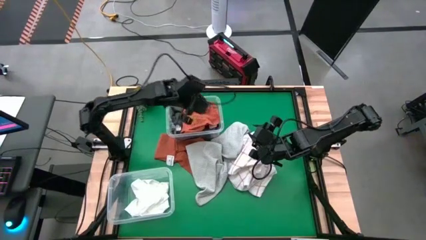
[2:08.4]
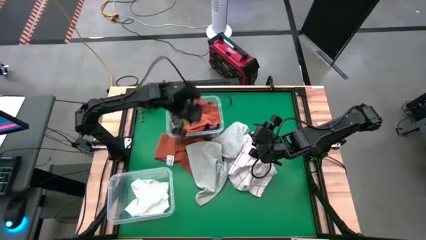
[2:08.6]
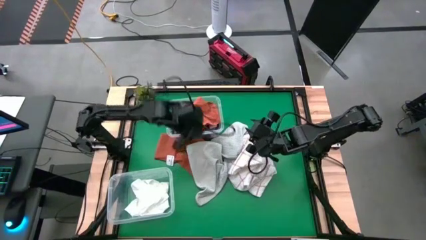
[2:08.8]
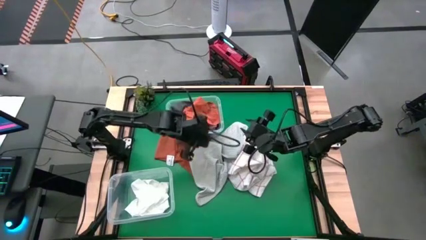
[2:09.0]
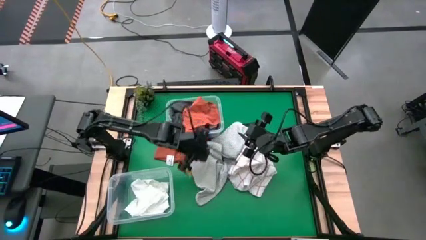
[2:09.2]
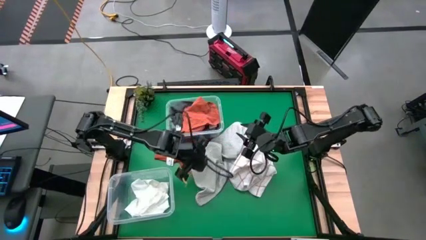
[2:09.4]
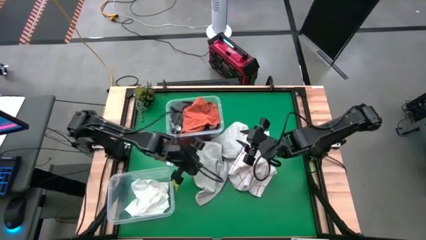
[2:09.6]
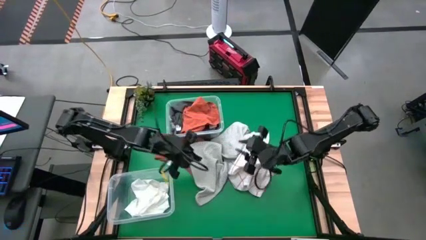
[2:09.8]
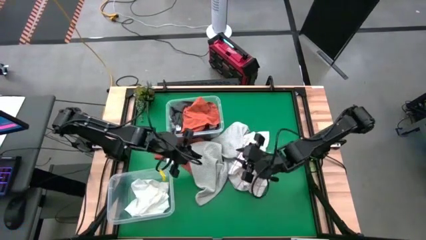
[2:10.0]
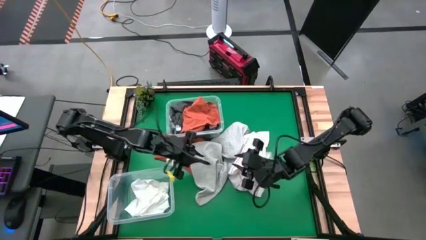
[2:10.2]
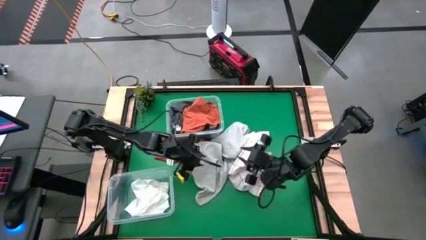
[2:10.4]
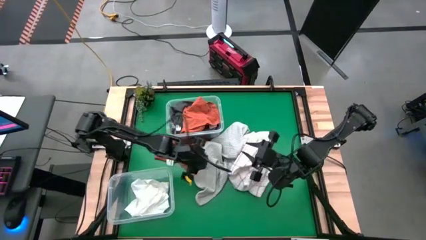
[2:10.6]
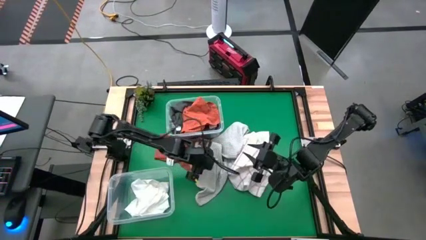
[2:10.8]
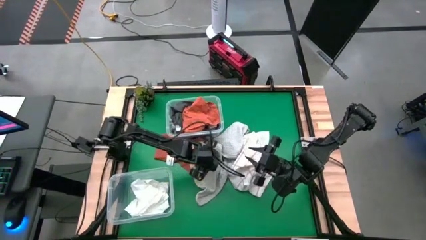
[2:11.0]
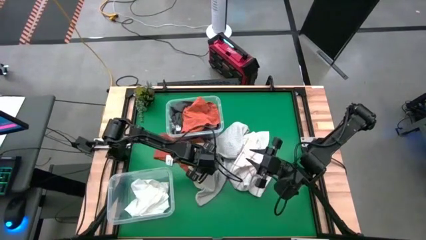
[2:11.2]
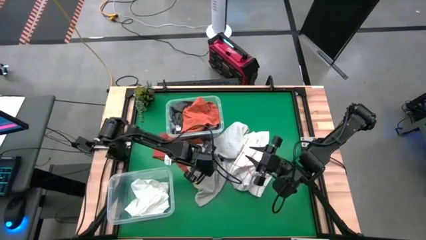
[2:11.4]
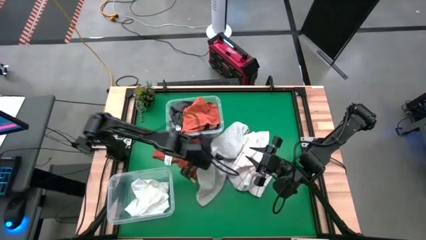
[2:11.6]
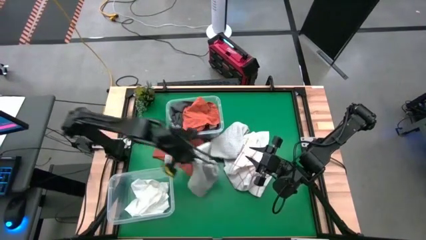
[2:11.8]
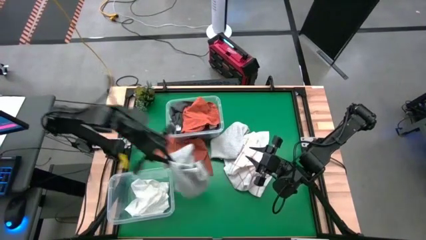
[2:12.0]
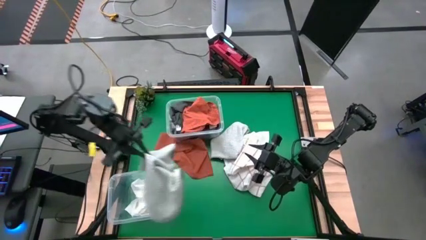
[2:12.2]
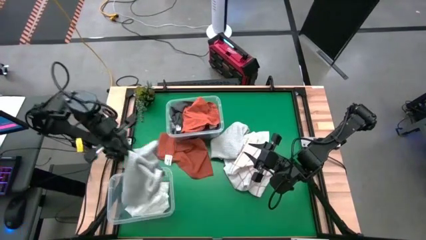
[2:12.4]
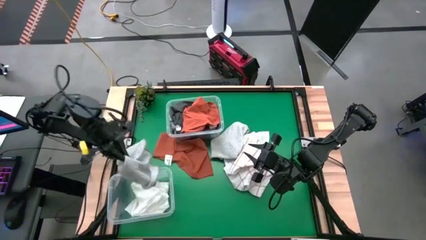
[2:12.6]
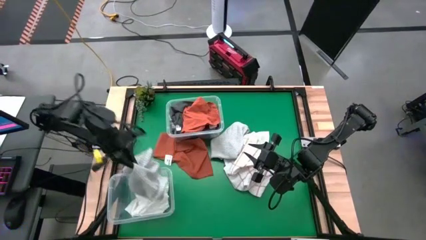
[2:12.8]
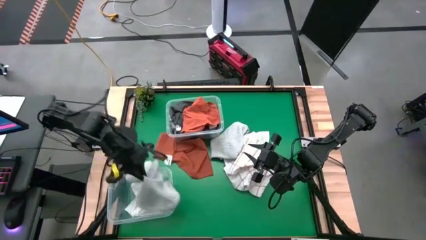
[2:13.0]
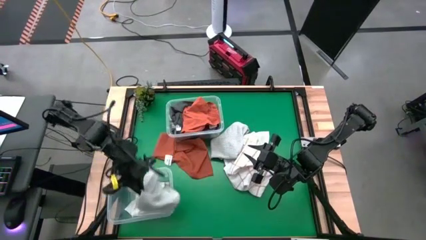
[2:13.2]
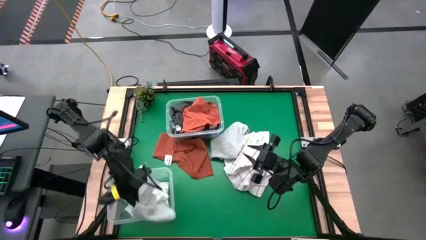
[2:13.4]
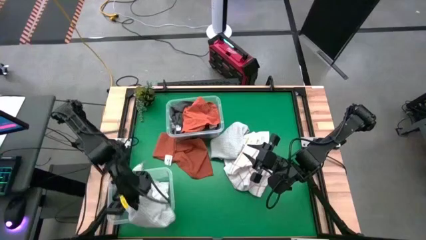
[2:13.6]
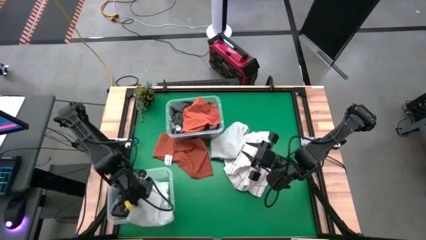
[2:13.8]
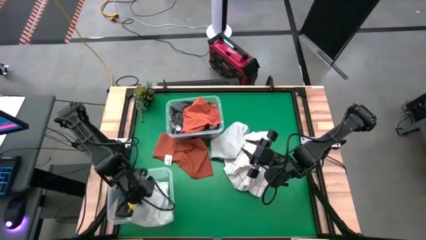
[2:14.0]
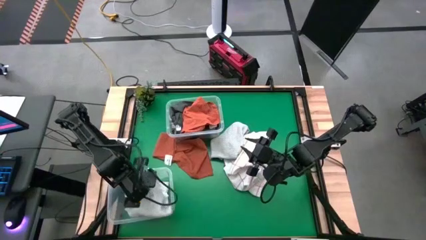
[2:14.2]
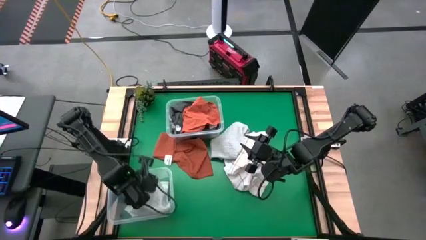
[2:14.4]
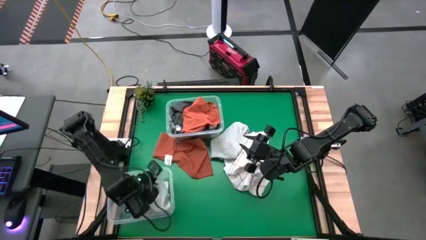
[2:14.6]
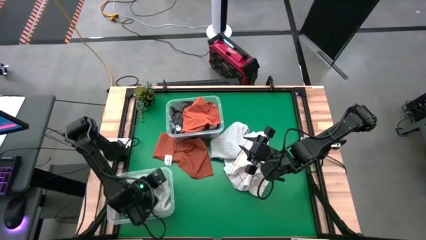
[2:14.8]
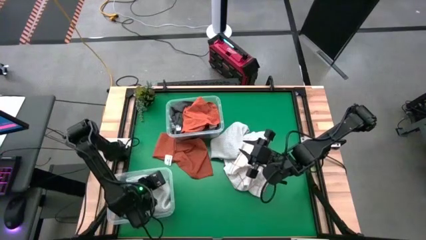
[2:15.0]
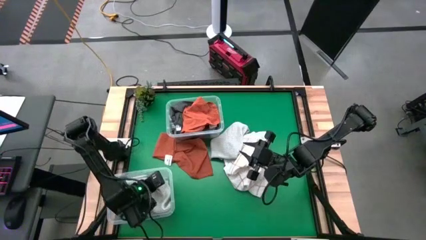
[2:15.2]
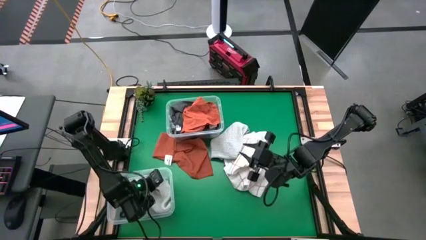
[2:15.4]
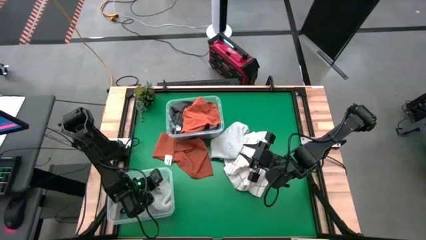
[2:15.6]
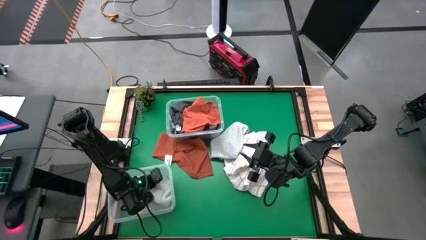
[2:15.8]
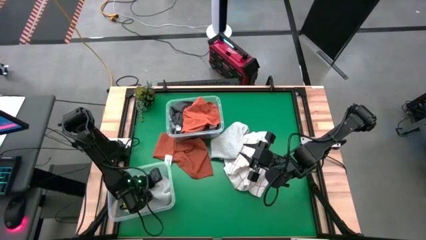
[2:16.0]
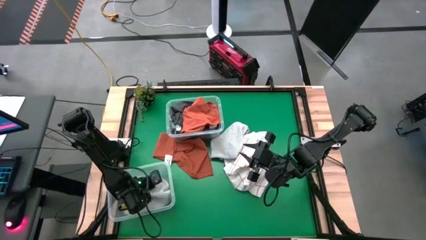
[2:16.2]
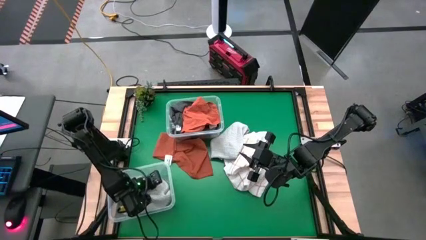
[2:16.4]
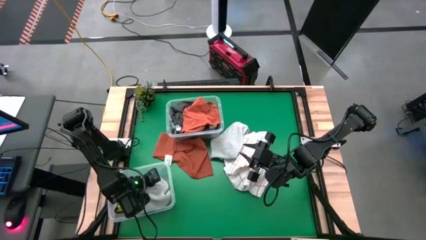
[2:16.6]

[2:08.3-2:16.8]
Task: Sort towels by color in basket
Put the top light gray towel into the bottom transparent bin

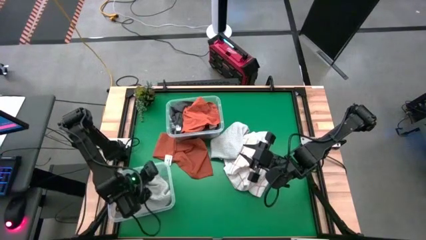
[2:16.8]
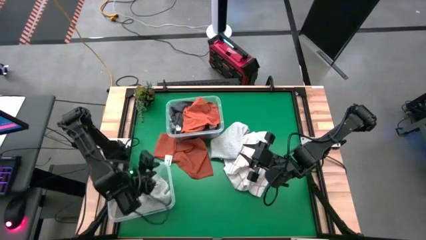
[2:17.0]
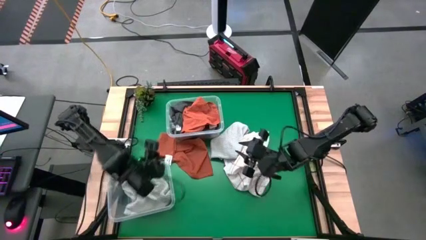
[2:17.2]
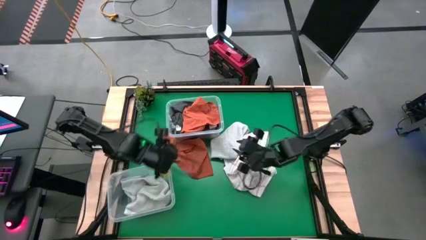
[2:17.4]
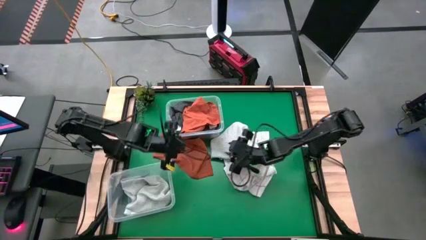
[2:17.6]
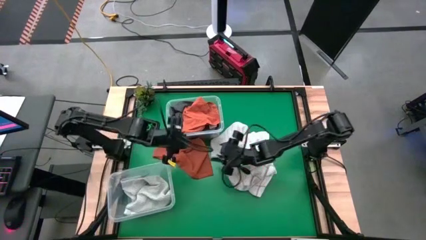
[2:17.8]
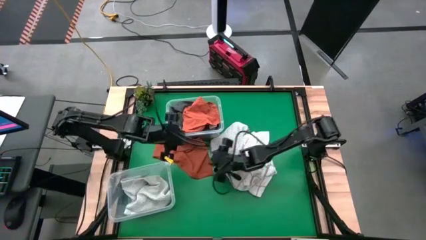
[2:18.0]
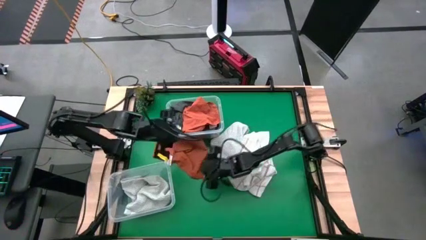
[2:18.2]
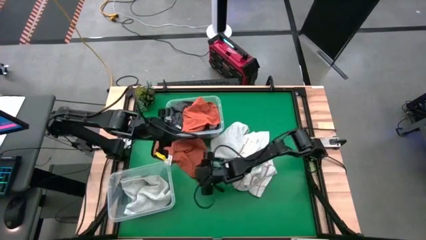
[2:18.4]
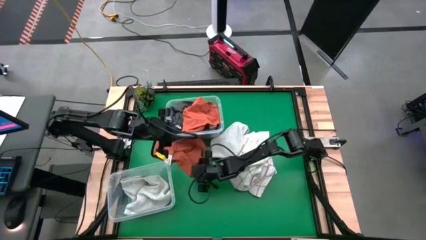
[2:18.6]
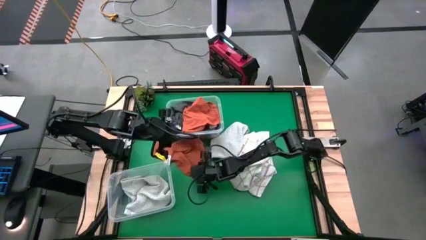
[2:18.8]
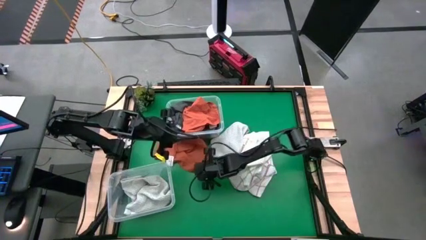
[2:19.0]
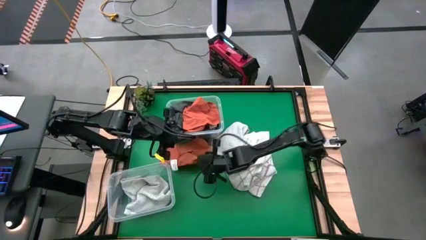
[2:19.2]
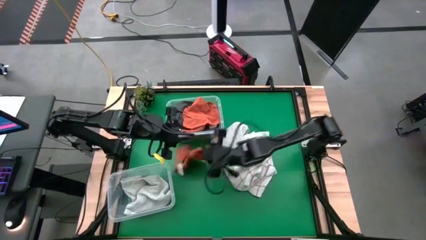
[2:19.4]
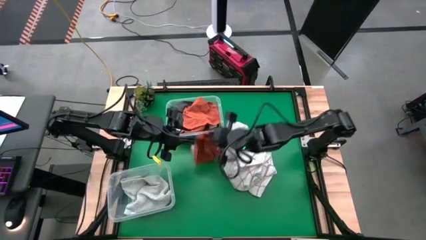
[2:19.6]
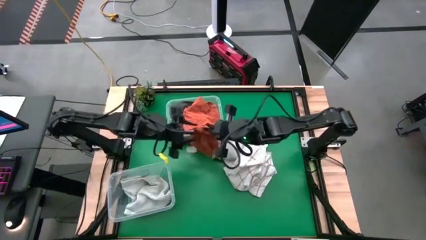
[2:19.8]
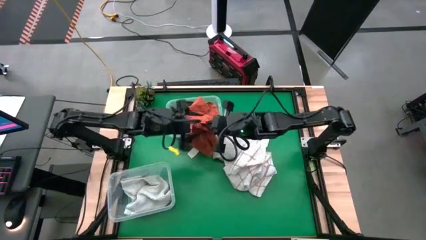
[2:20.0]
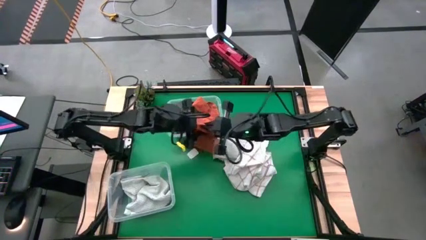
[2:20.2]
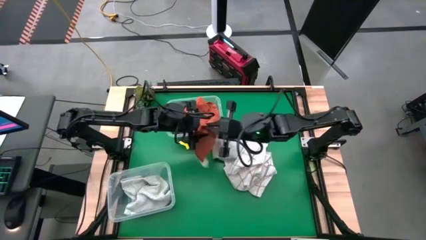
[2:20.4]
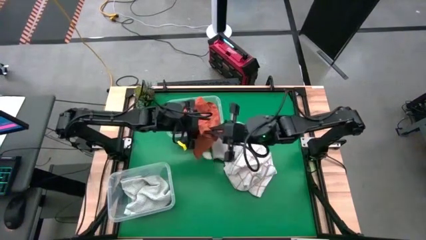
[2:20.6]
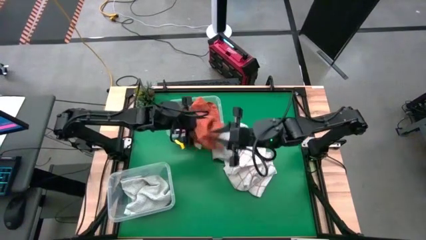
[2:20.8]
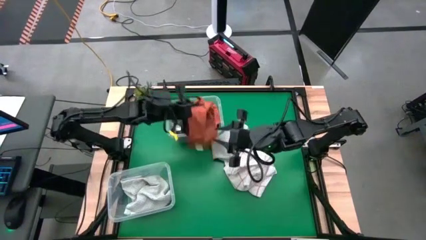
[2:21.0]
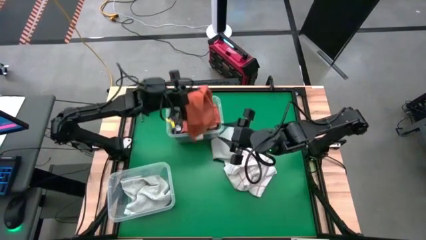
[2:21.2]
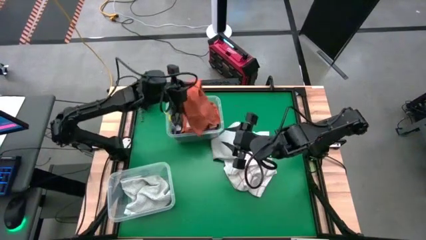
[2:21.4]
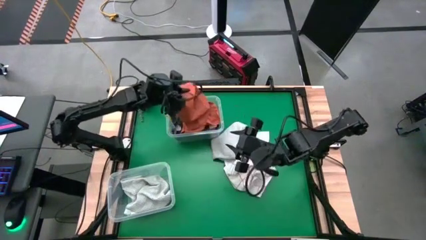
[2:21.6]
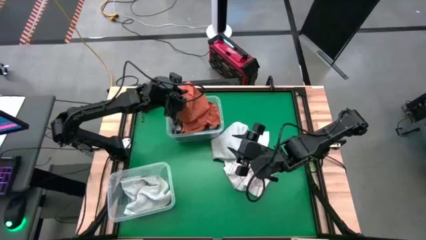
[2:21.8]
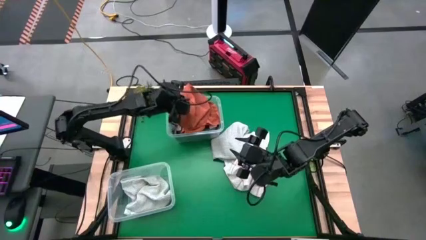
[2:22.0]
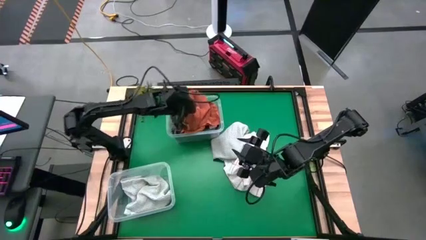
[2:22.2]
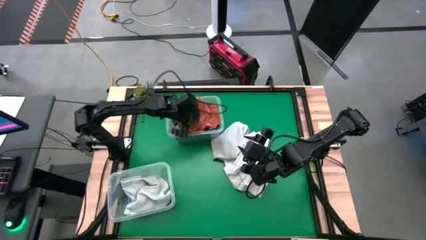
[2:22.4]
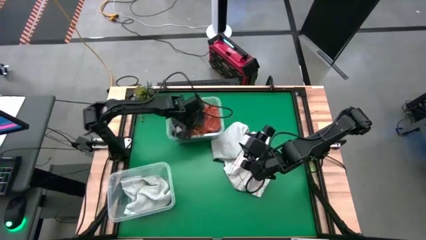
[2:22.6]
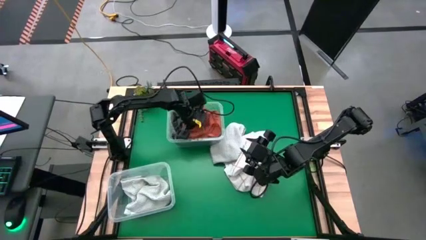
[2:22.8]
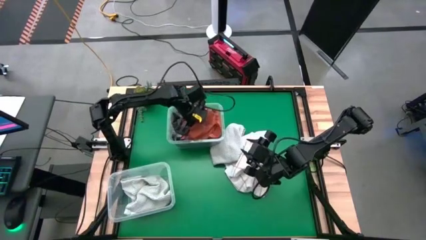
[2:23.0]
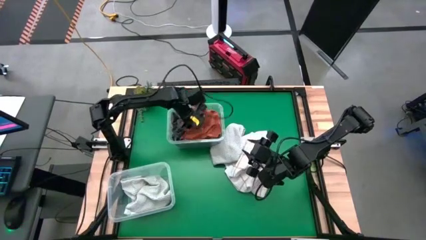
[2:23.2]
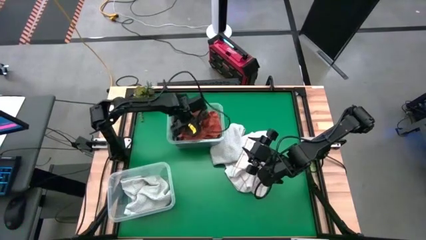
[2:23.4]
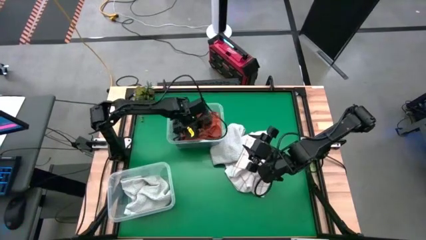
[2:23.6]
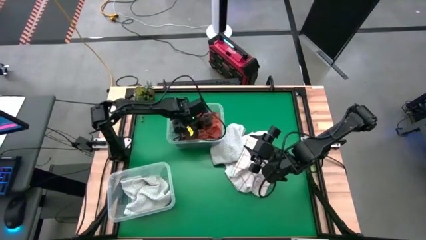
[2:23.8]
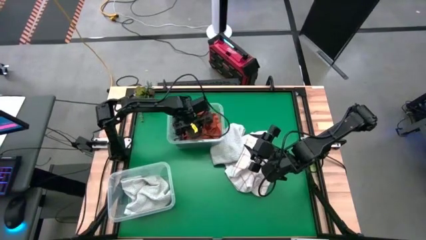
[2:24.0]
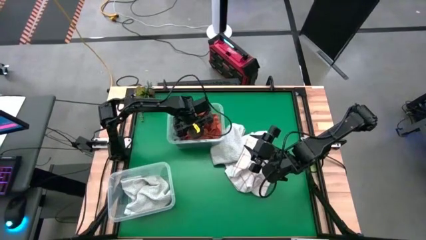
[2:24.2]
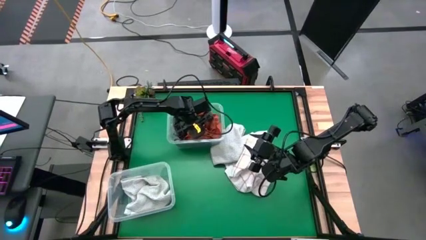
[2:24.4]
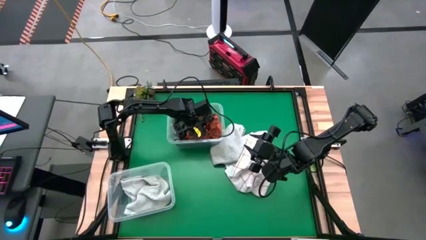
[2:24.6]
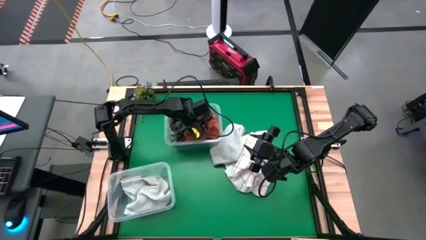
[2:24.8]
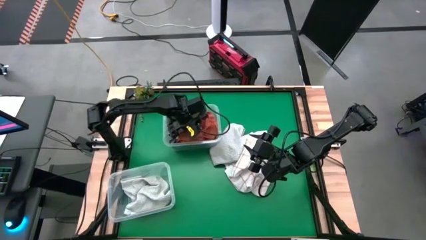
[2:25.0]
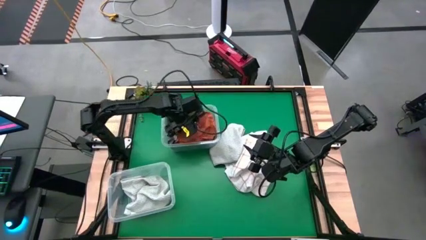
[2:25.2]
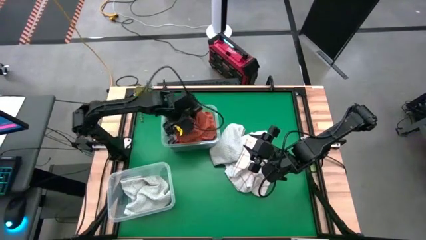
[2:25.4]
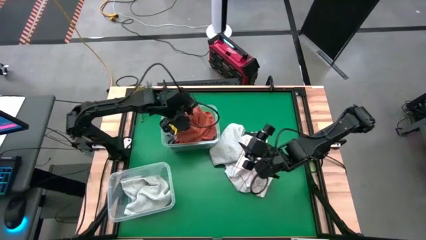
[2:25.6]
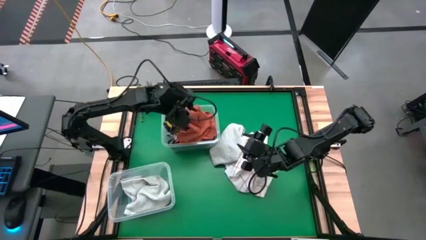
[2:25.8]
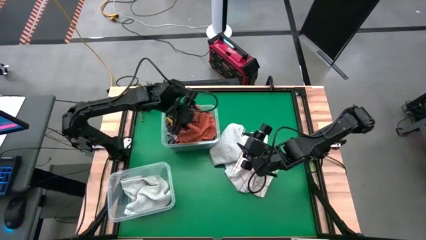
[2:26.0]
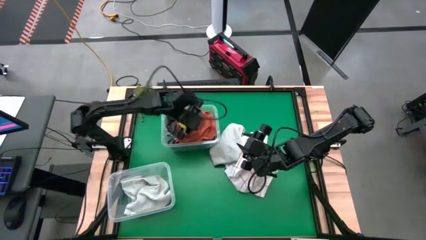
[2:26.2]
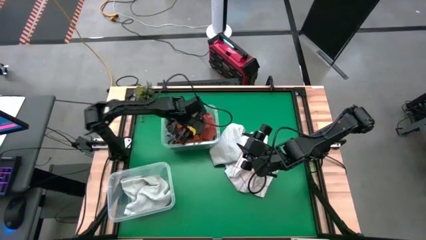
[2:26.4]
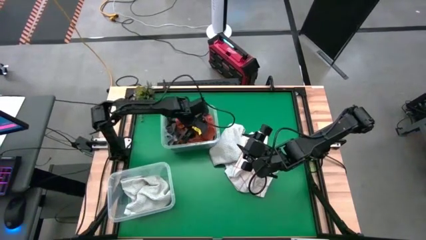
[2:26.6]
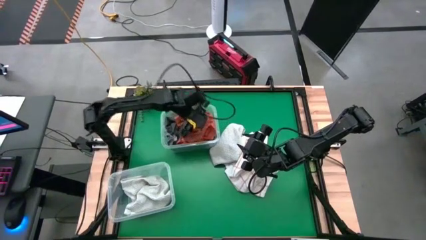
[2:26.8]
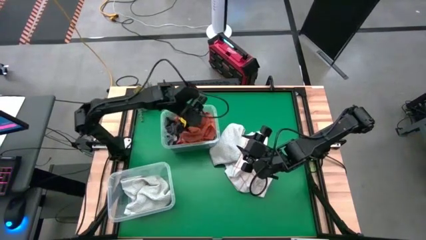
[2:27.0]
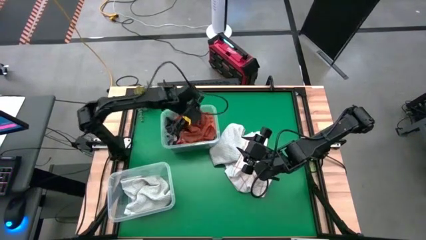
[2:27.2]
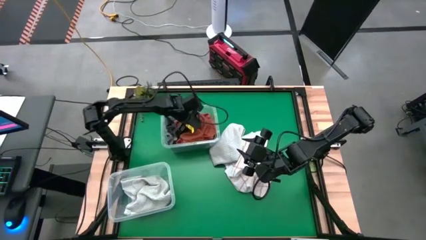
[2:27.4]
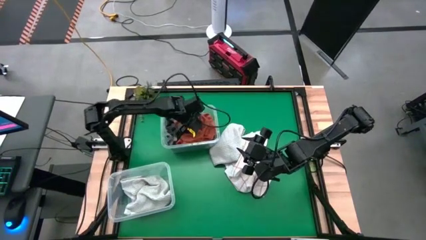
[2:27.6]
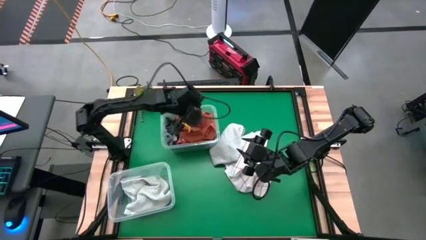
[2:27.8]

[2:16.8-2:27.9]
Put the orange towel into the top transparent bin
